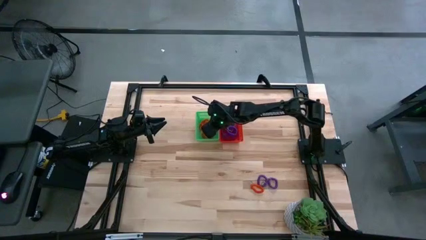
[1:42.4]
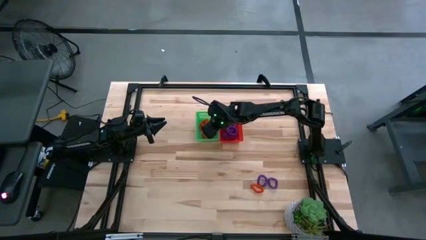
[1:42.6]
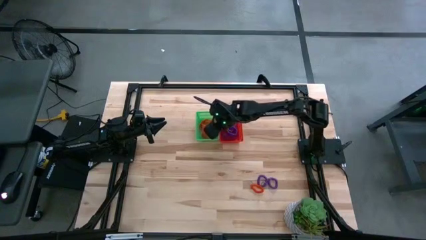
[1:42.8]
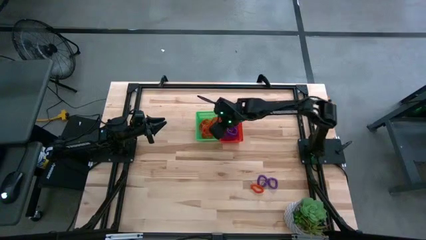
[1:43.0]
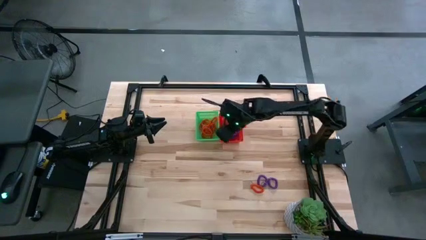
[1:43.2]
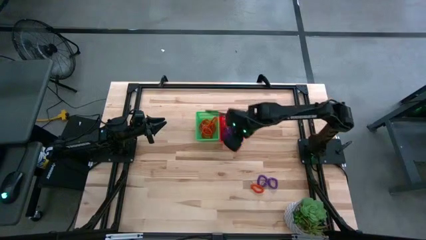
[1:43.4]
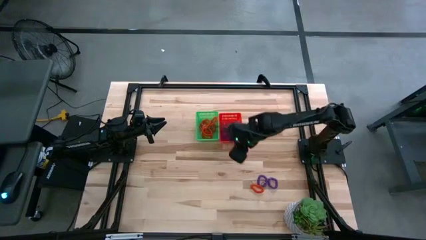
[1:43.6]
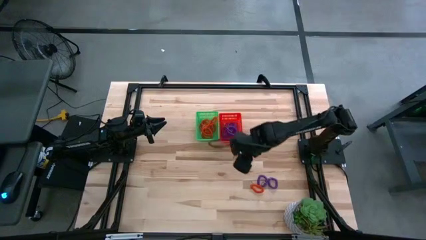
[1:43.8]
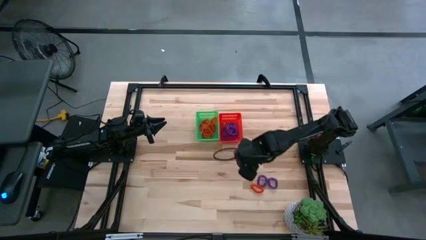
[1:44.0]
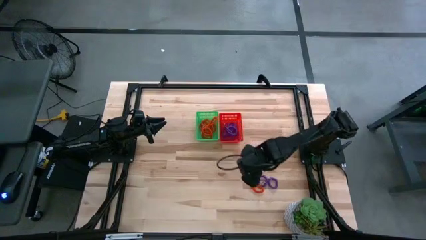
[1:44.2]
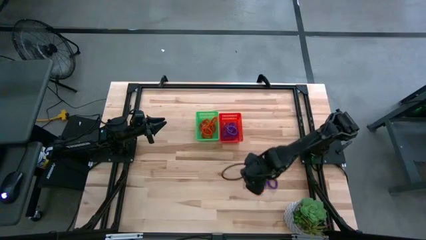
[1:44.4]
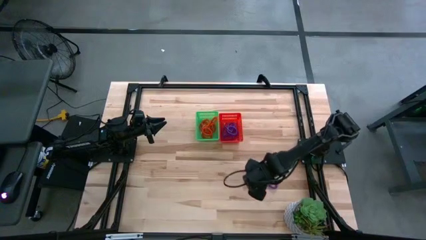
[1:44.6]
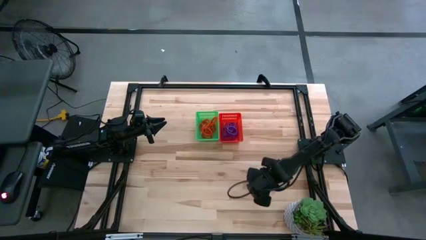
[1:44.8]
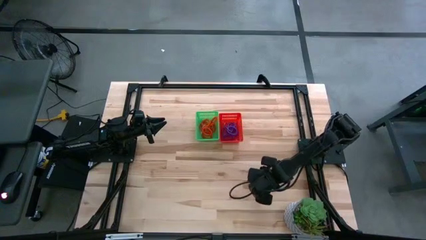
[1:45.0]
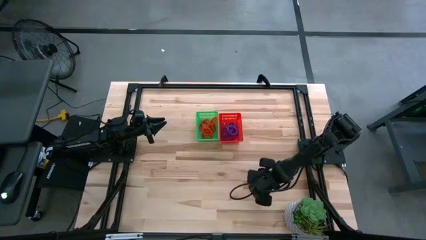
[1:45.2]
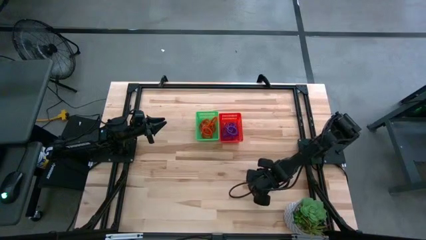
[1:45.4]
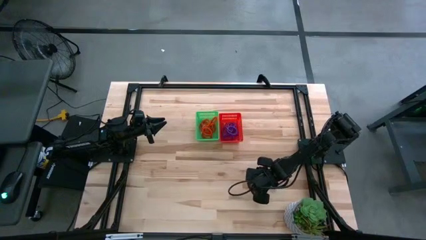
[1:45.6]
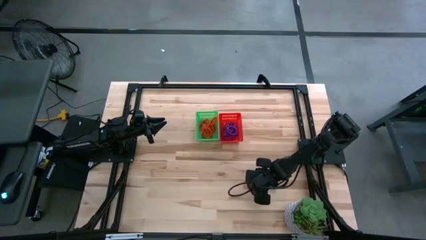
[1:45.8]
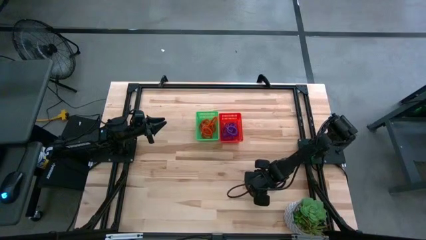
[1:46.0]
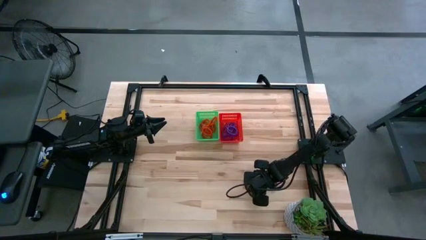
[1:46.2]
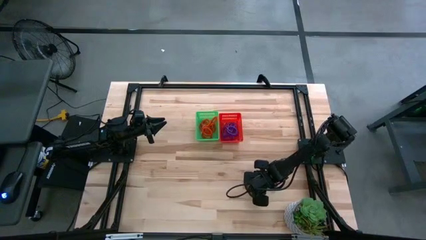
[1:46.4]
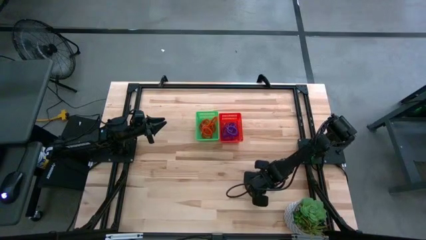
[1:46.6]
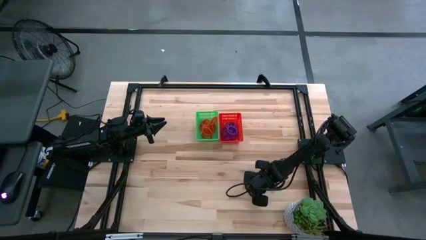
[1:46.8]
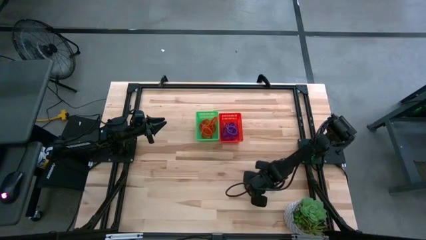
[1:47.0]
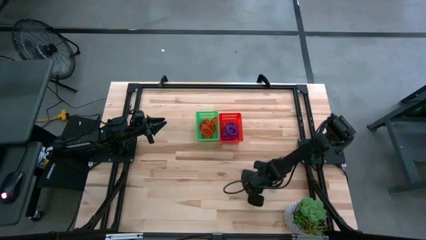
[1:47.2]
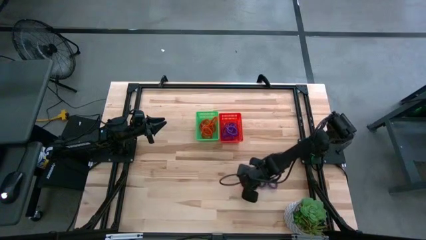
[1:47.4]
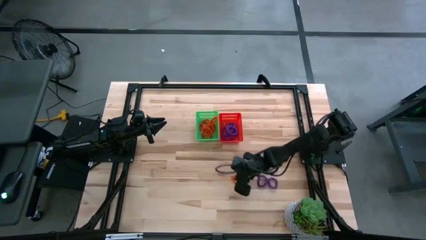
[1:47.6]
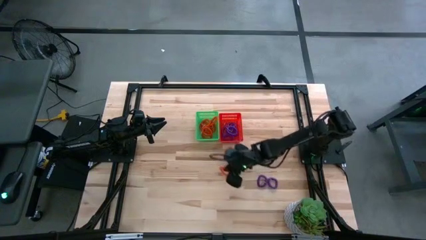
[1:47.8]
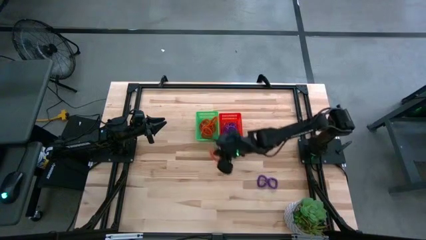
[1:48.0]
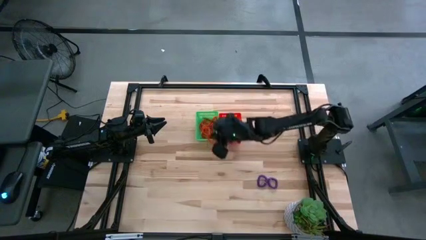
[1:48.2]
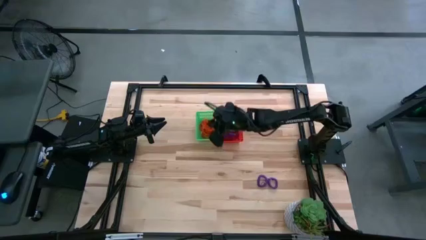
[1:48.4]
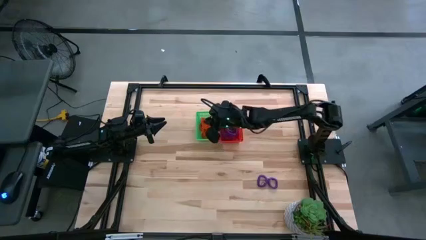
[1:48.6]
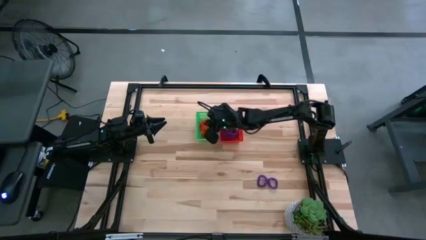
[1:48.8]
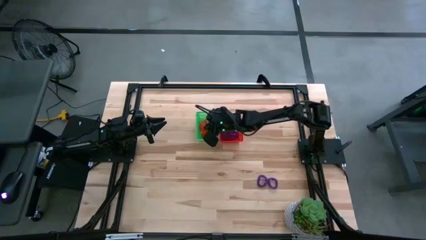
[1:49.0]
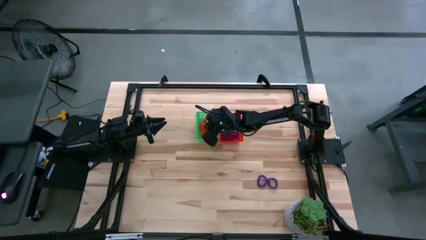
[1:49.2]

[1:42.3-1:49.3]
Task: Sort spring keychains
Put the orange spring keychain into the green bin

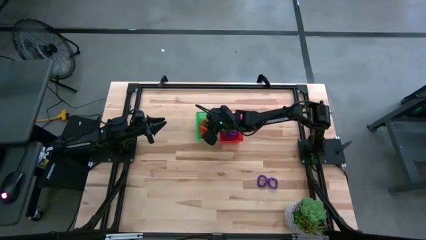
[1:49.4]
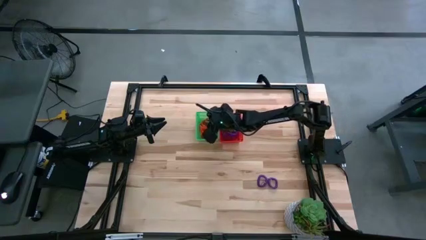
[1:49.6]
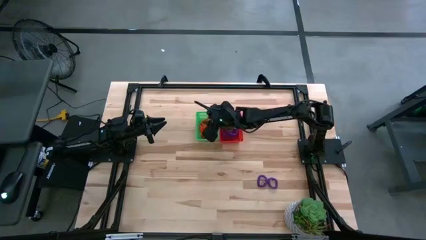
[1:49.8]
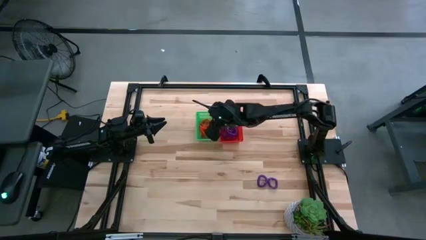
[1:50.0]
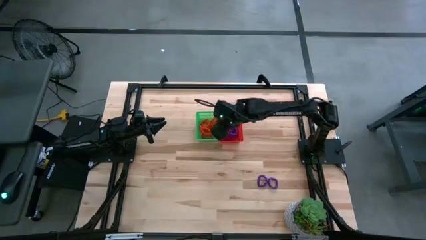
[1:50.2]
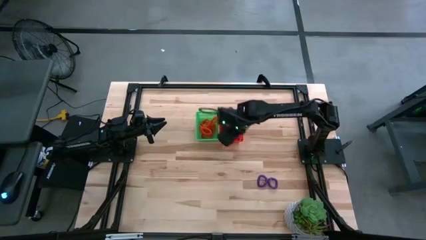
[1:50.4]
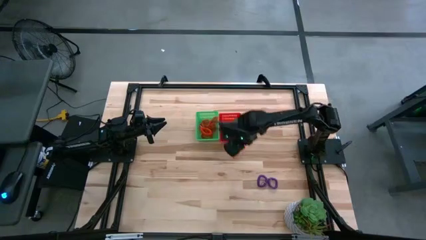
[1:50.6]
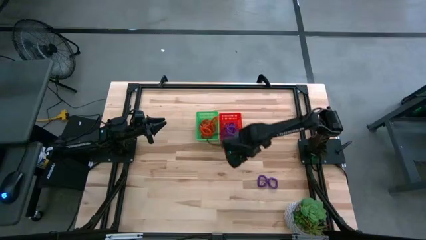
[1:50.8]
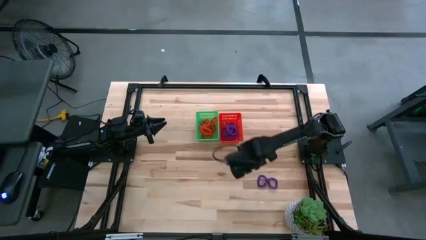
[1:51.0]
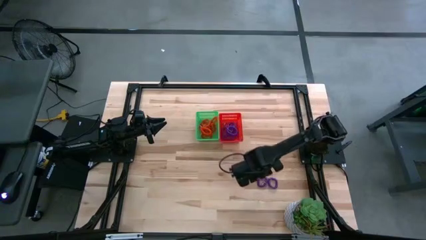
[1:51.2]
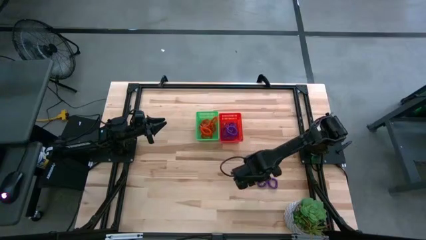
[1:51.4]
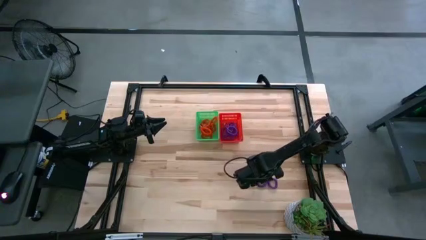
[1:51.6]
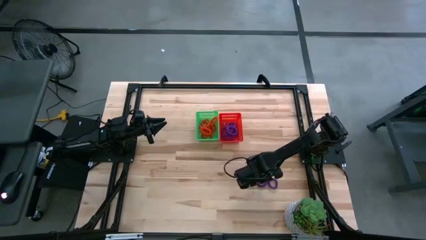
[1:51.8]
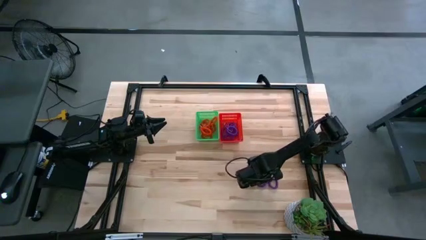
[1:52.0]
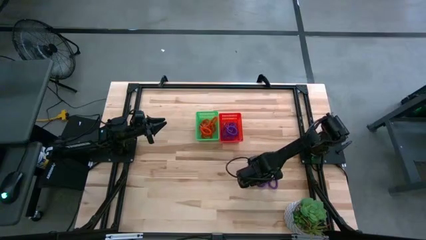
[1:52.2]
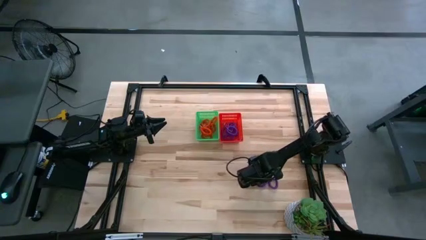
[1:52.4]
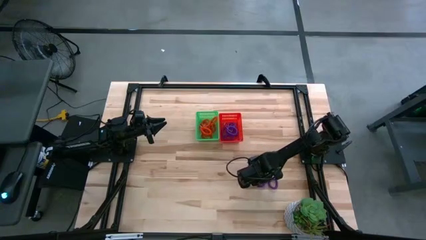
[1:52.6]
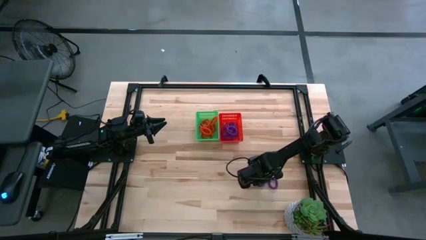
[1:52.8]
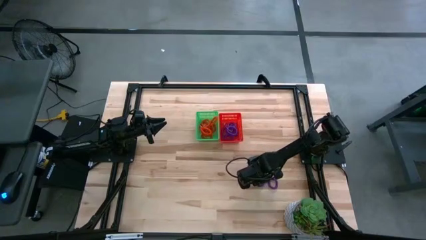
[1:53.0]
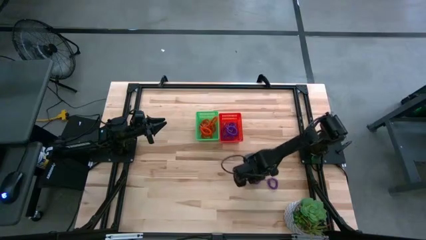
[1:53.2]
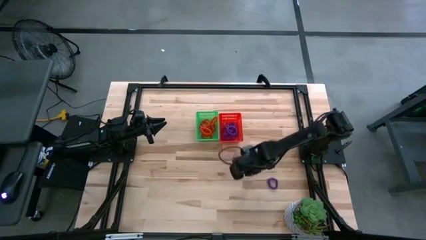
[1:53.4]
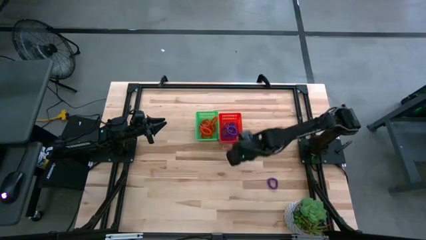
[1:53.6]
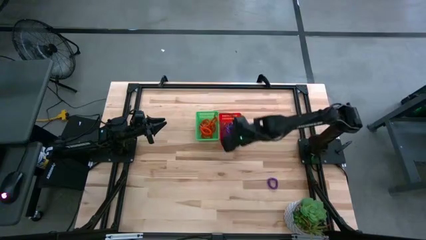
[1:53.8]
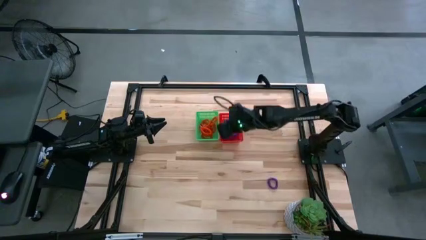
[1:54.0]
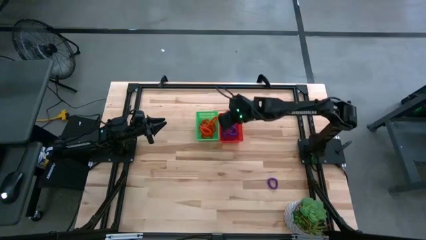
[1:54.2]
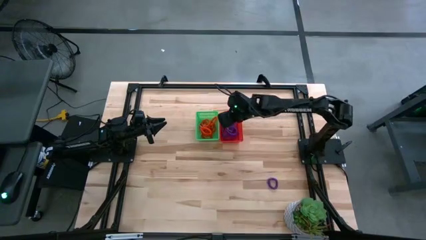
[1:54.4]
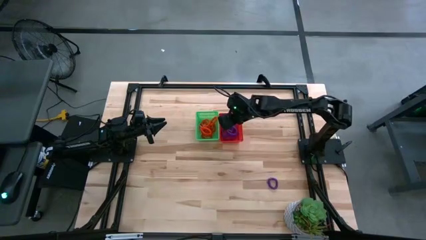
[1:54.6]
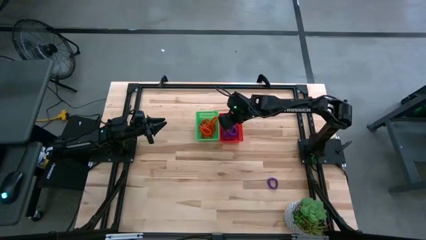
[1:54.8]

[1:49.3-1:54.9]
Put the purple spring keychain into the orange bin

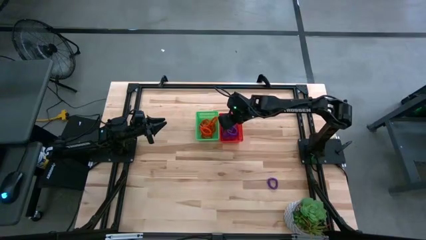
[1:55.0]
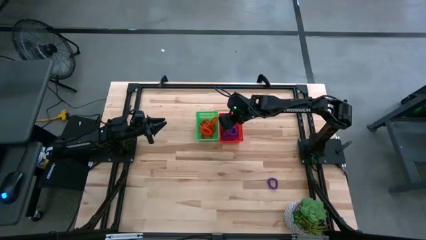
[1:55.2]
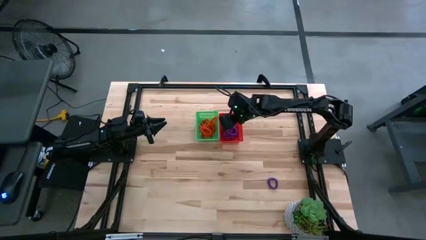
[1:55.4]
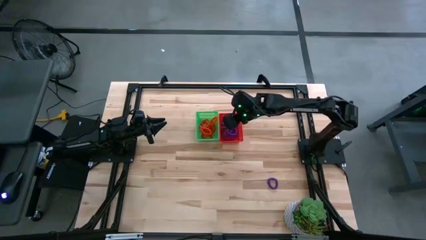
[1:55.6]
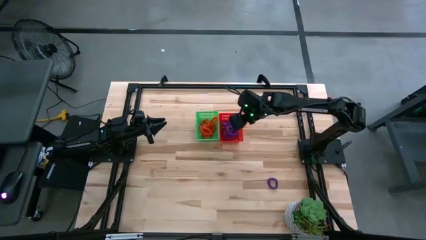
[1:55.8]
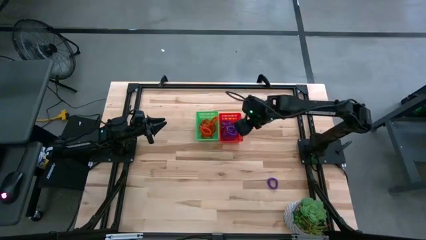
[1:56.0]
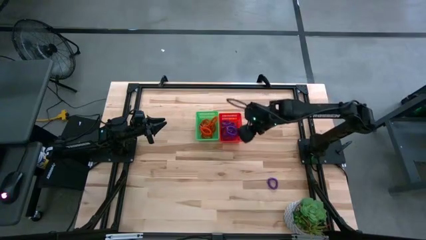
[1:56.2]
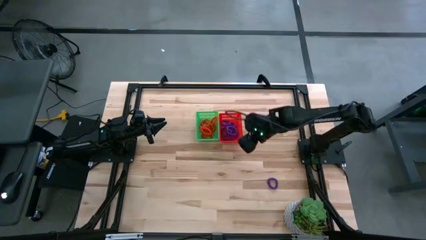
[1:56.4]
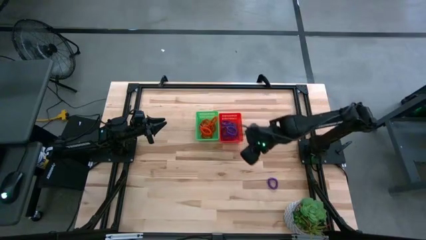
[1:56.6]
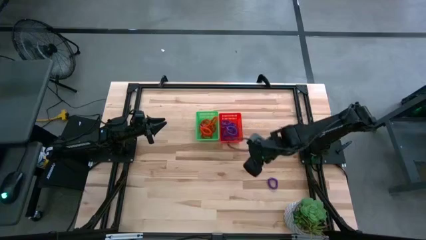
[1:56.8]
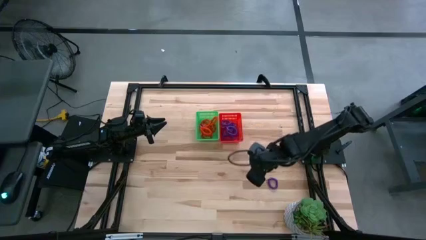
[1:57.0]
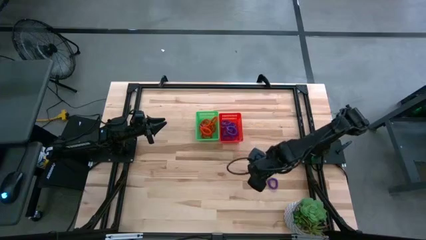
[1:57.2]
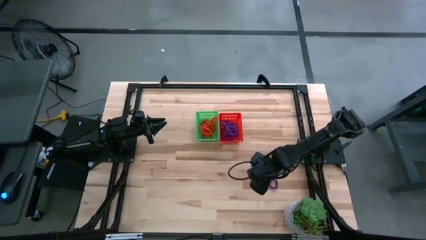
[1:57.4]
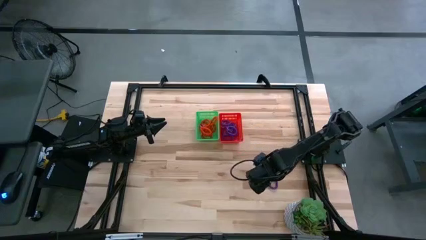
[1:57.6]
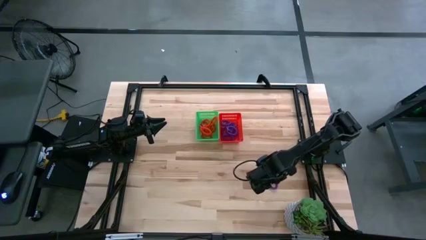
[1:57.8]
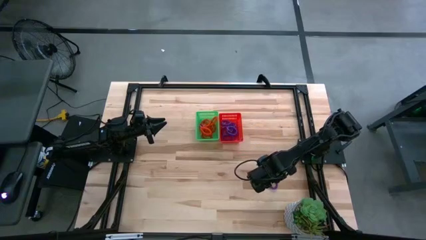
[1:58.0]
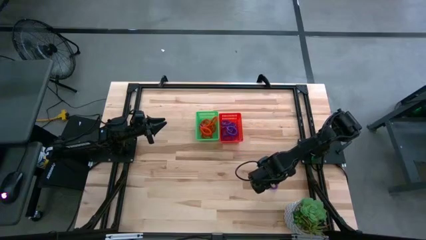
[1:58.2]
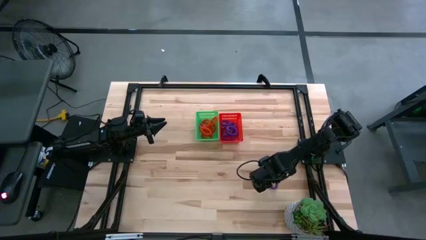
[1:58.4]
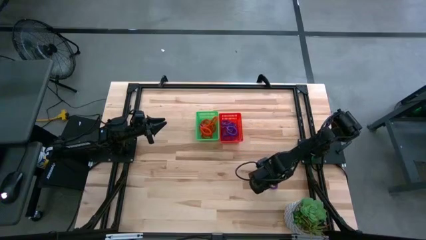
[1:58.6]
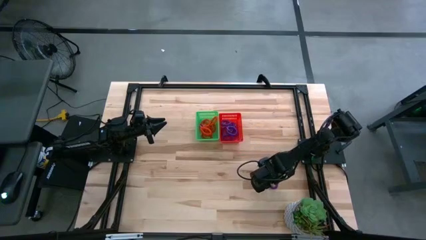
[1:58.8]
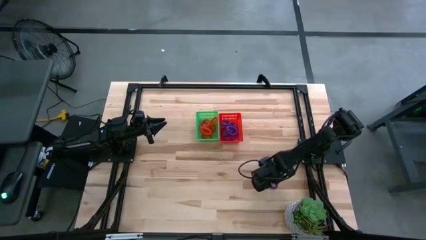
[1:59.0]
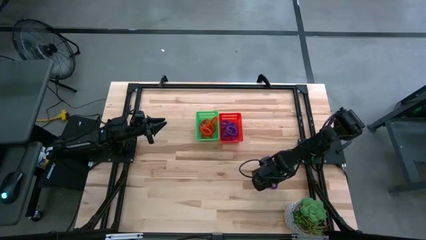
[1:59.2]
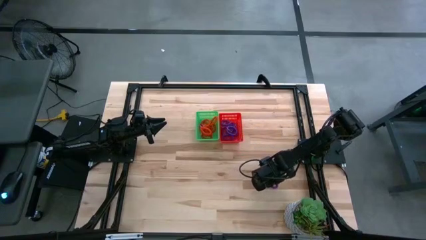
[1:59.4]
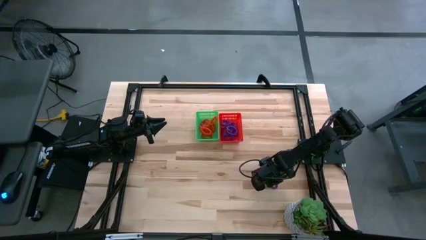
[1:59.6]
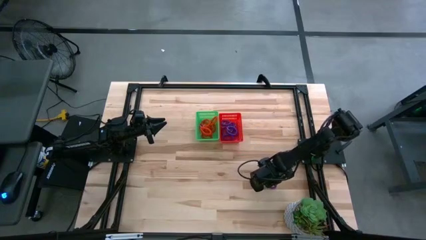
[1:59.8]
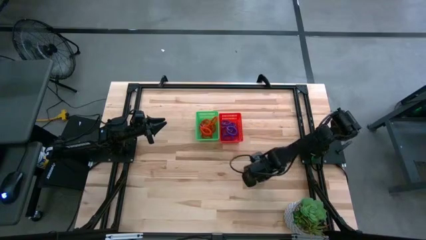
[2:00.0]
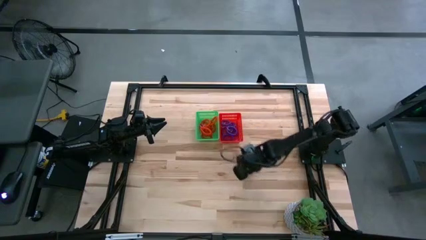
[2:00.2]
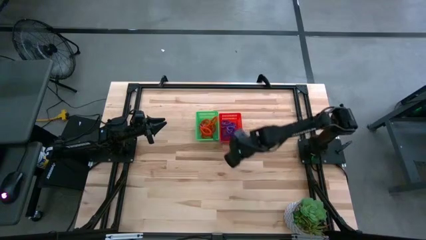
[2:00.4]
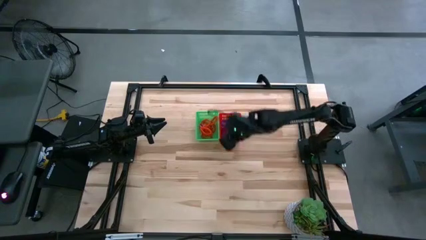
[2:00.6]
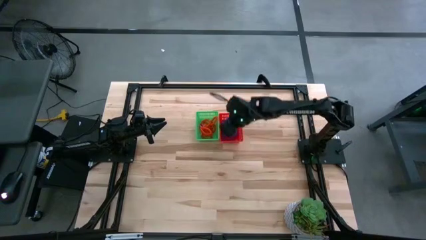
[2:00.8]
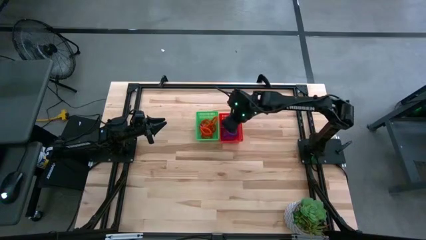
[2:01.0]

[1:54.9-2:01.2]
Put the purple spring keychain into the orange bin
